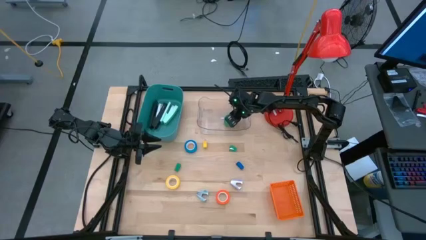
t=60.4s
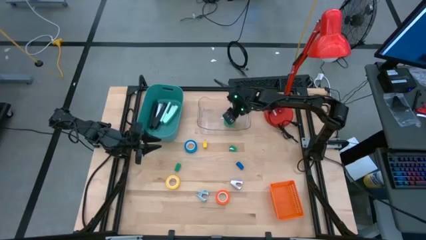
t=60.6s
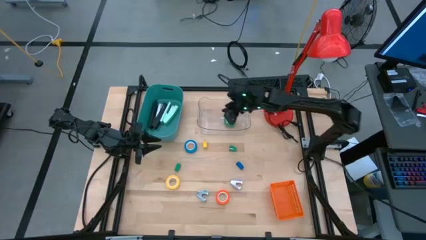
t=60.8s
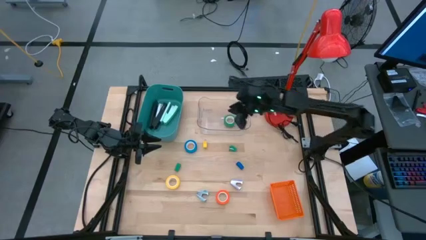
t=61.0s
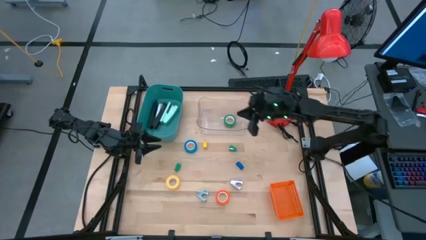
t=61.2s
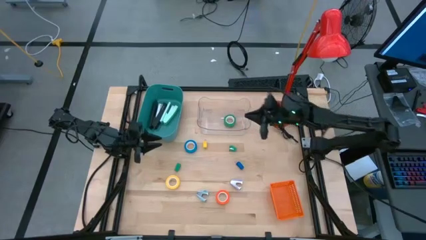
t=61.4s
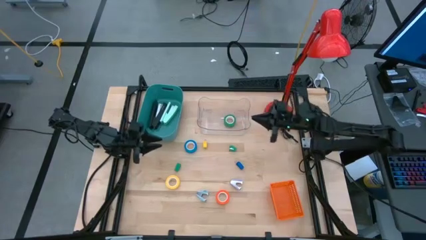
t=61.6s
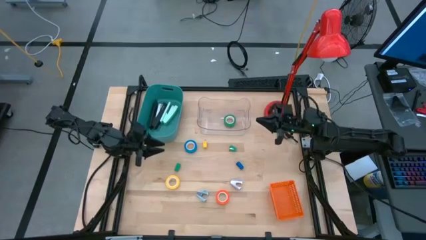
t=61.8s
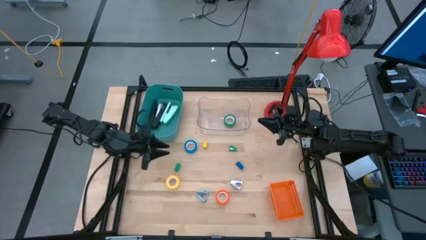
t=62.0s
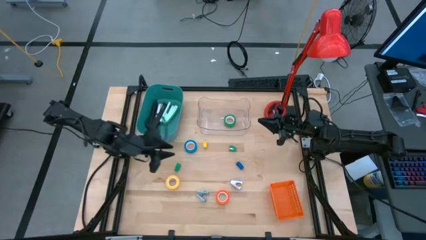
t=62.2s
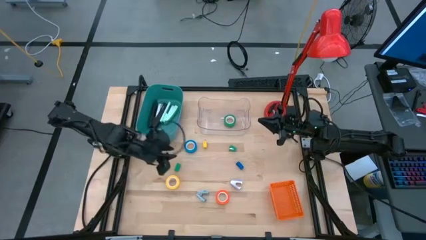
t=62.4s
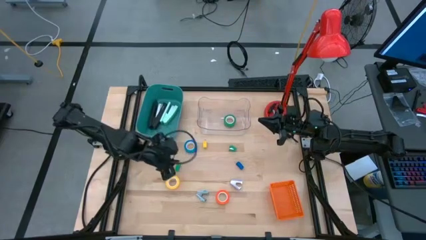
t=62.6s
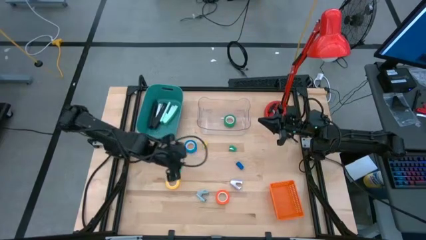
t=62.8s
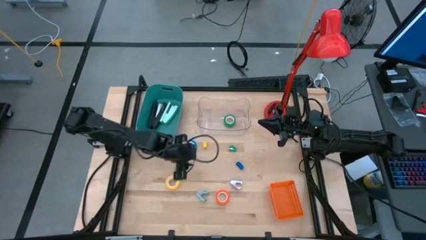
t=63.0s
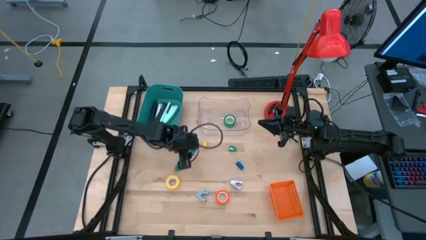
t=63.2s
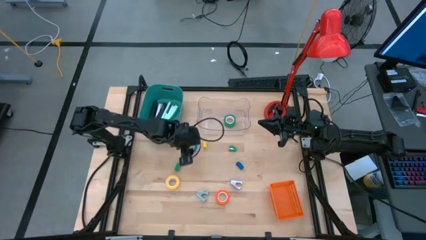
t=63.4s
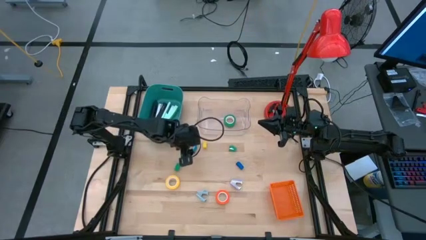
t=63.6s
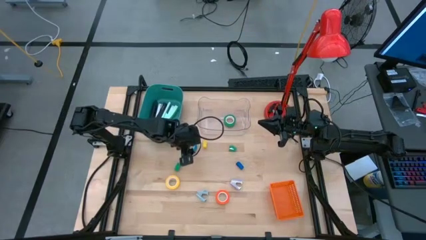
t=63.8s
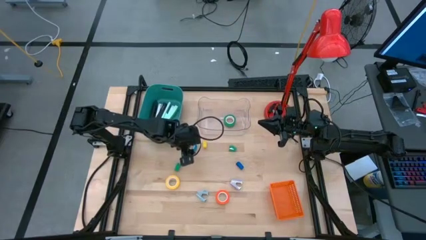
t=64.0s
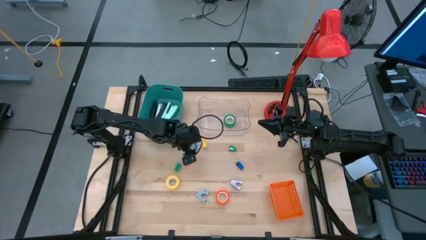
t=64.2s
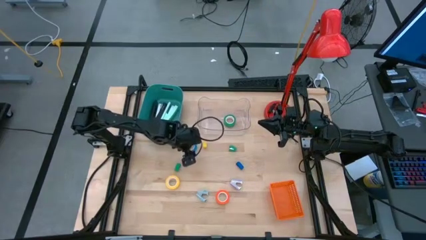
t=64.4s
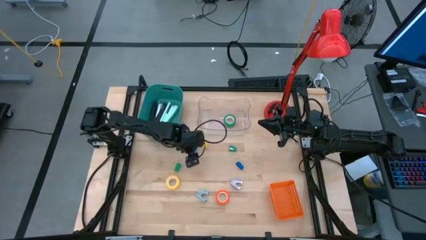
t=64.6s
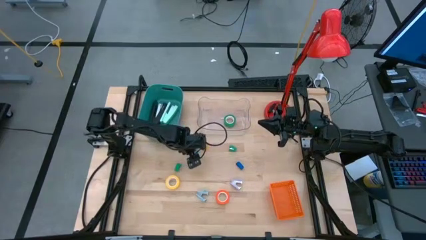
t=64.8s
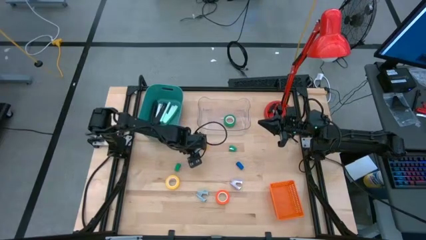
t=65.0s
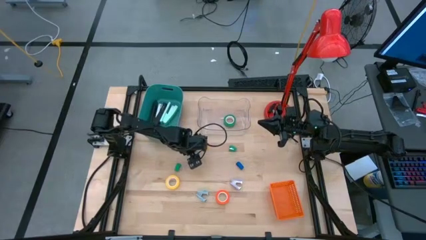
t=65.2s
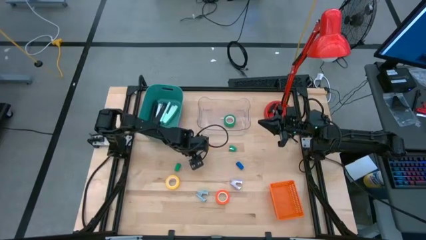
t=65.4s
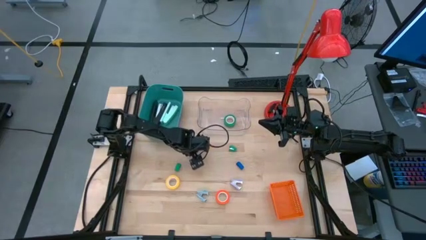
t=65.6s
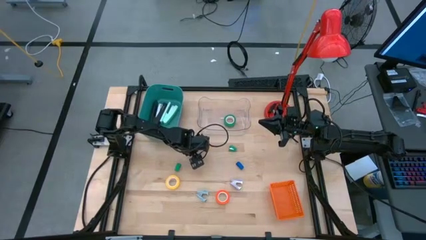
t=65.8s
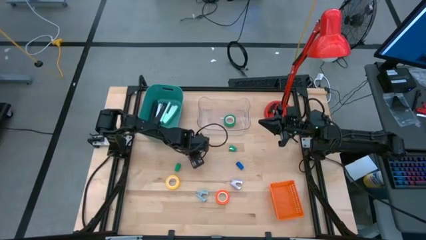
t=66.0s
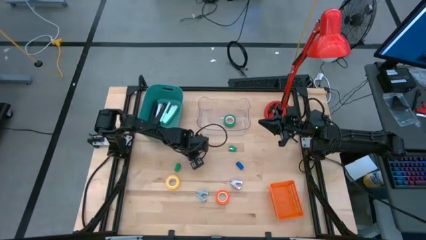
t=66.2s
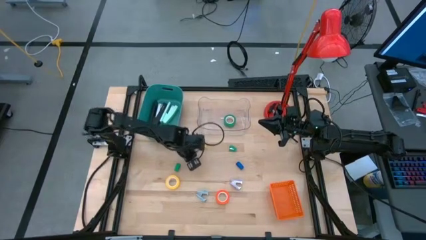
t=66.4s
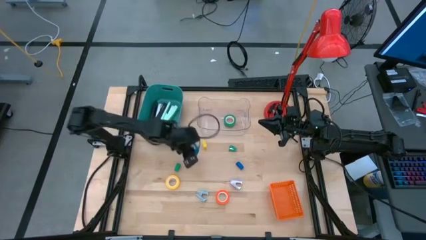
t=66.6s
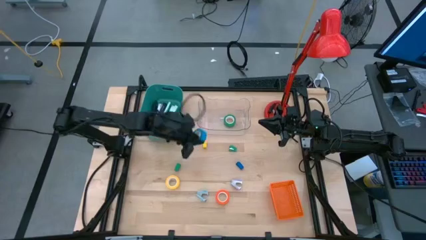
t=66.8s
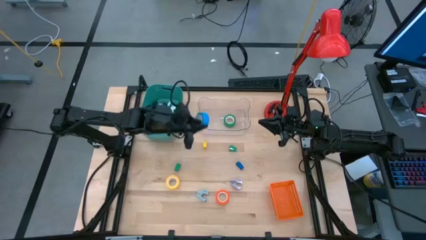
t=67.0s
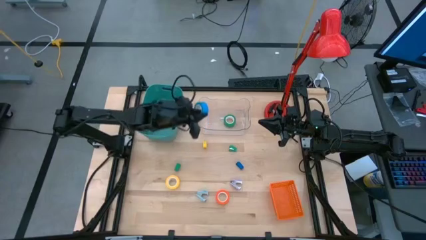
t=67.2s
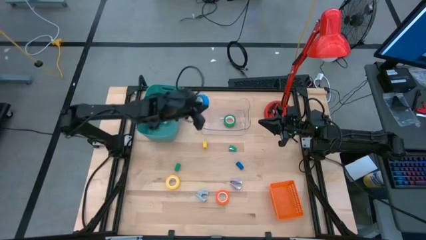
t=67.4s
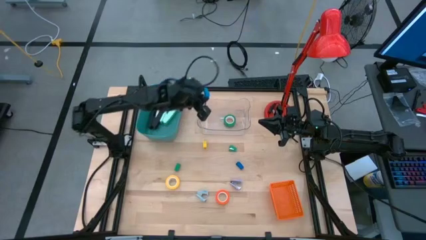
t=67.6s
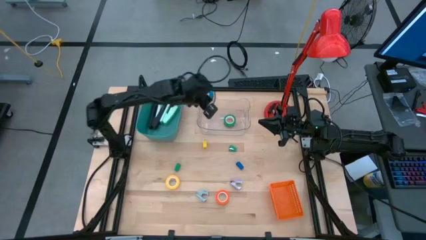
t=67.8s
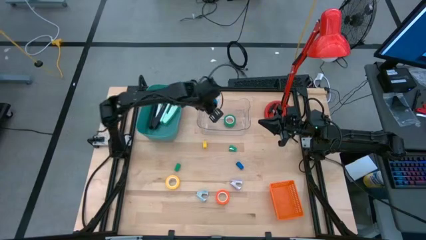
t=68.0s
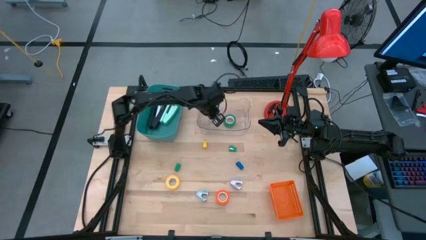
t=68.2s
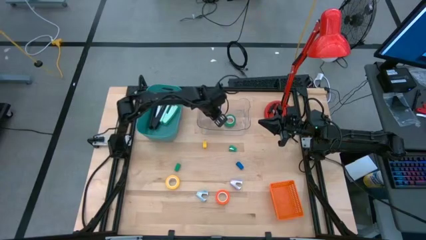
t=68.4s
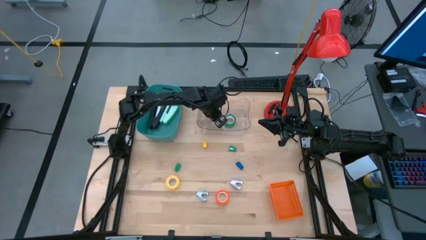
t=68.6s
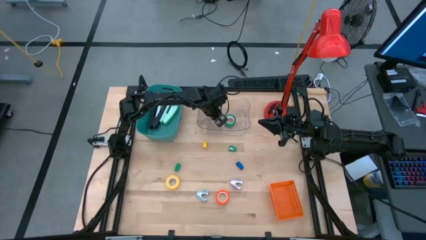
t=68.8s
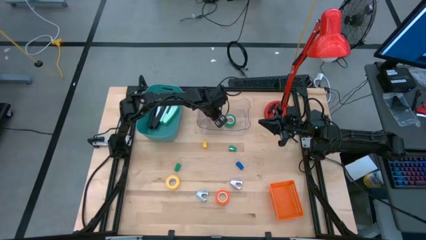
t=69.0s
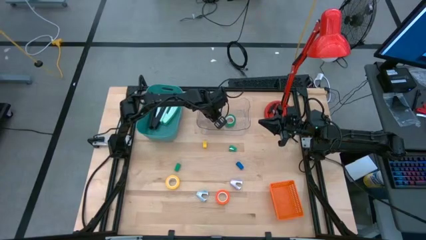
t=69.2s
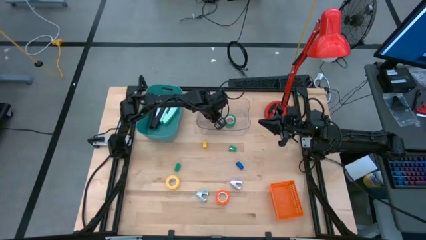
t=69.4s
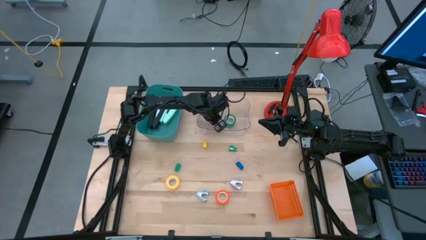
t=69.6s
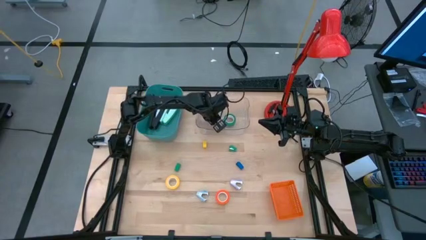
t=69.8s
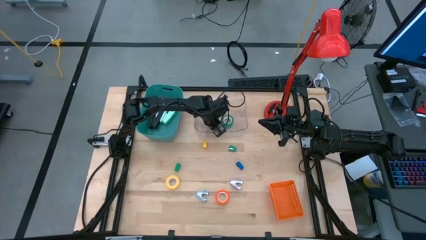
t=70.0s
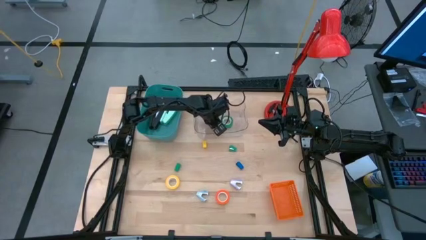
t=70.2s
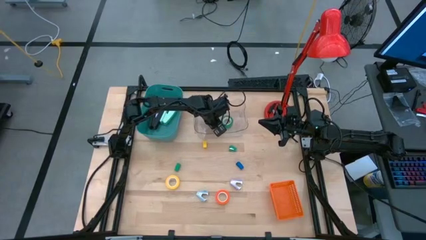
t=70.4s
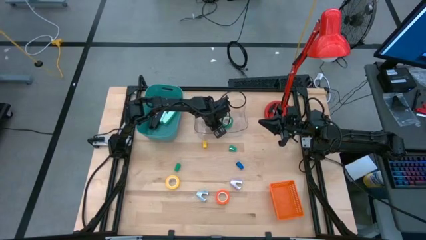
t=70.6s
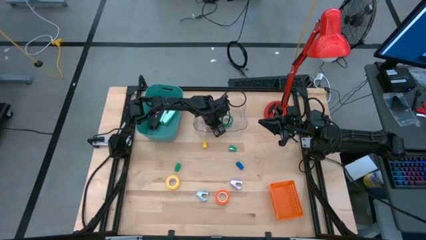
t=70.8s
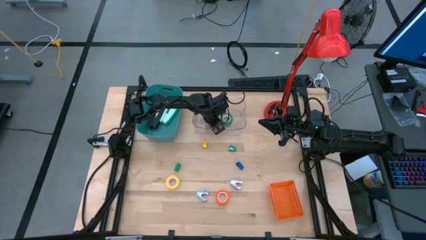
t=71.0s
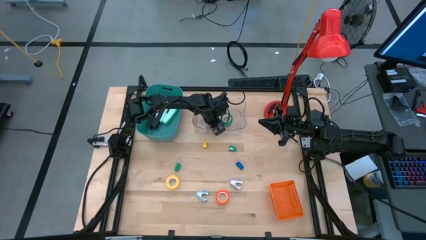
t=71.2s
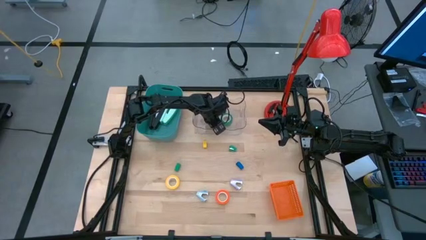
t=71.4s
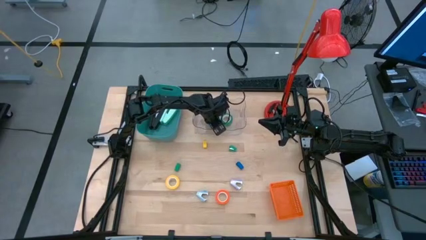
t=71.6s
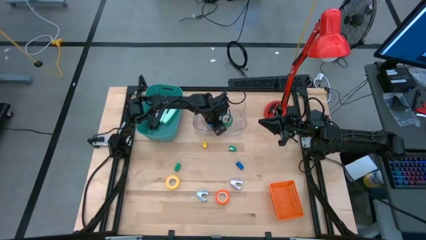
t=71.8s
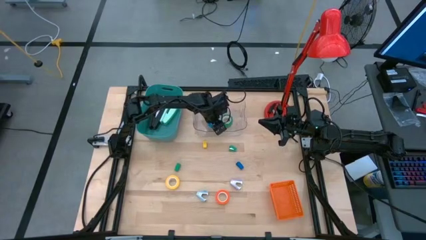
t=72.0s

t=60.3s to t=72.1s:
Task: Pick and place Stapler, Stapler remover, tape
Put the blue tape into the transparent bin

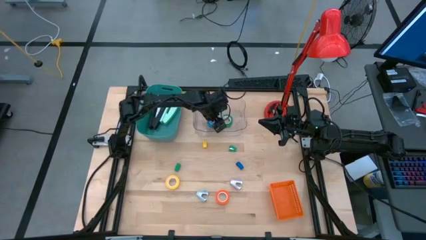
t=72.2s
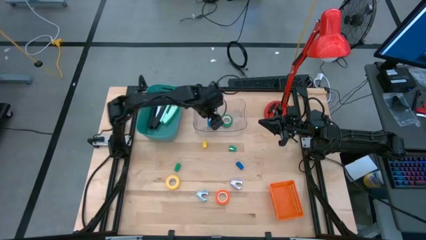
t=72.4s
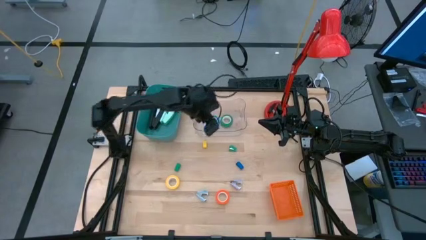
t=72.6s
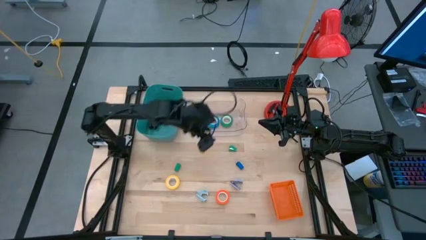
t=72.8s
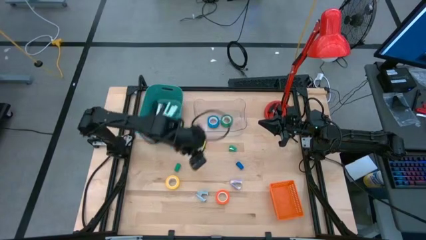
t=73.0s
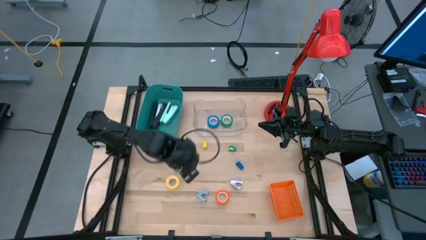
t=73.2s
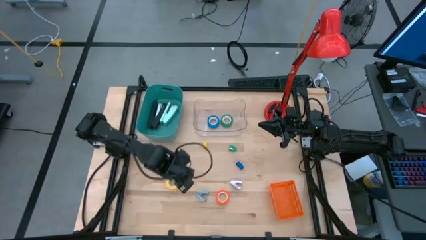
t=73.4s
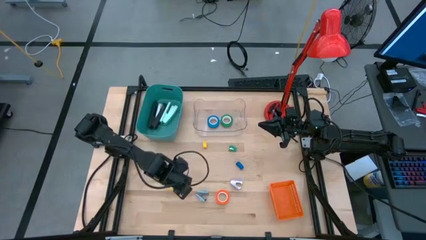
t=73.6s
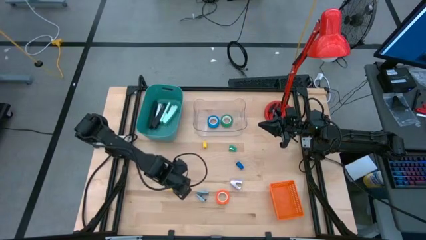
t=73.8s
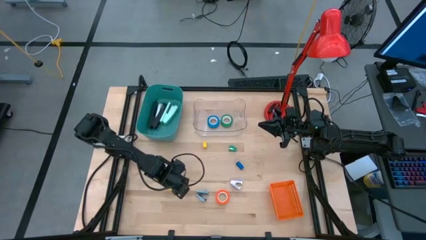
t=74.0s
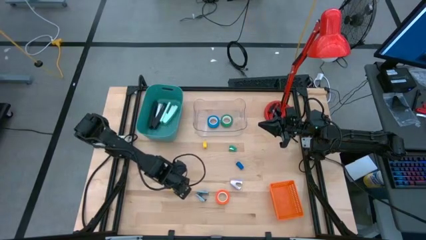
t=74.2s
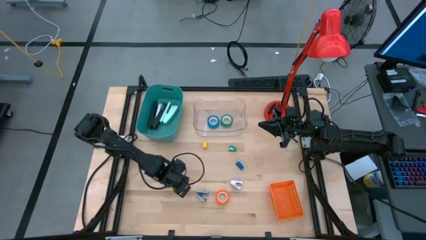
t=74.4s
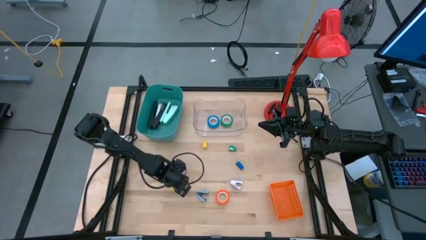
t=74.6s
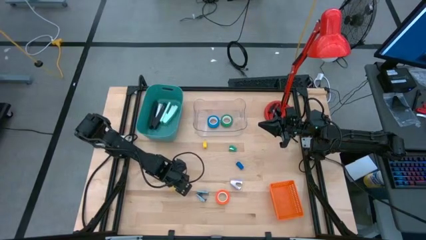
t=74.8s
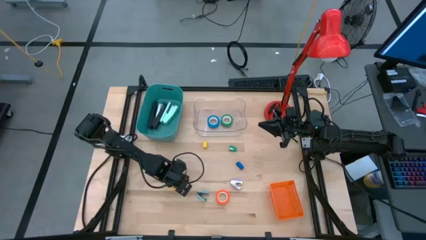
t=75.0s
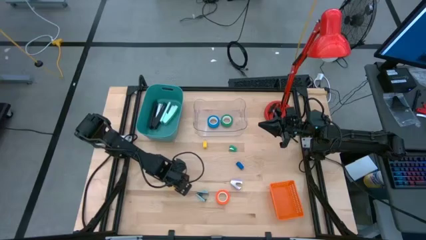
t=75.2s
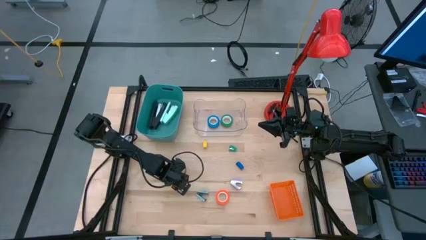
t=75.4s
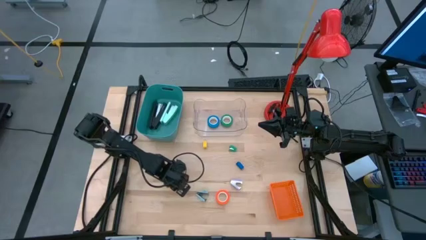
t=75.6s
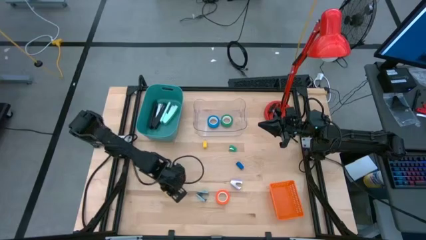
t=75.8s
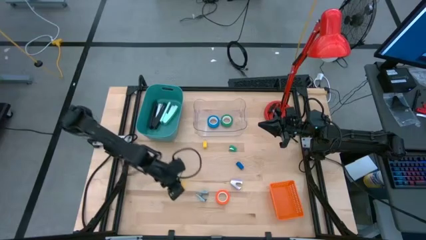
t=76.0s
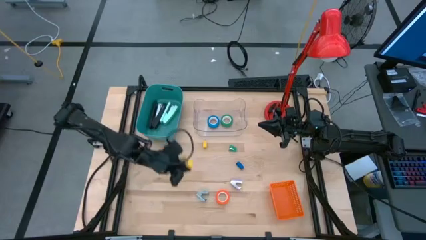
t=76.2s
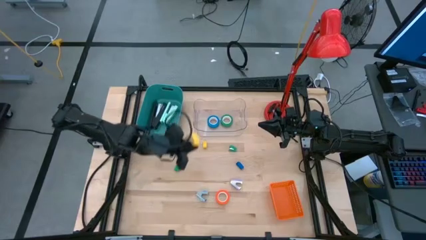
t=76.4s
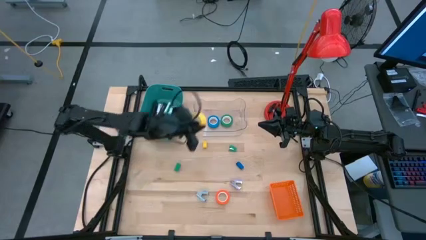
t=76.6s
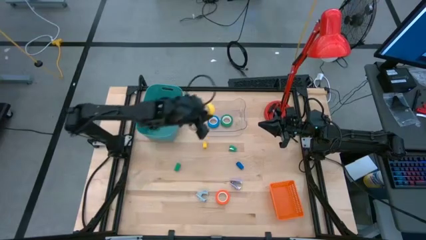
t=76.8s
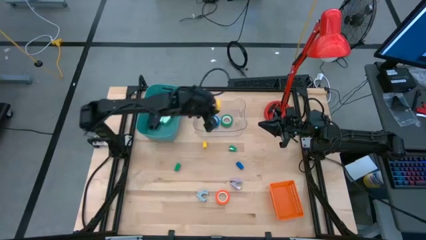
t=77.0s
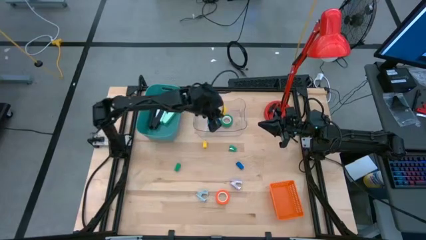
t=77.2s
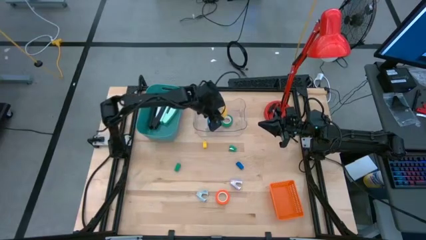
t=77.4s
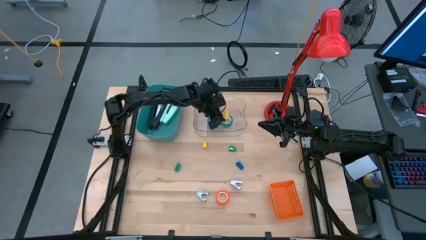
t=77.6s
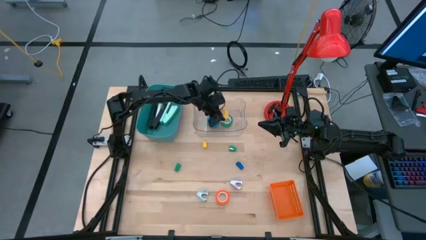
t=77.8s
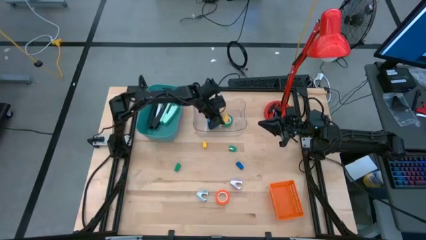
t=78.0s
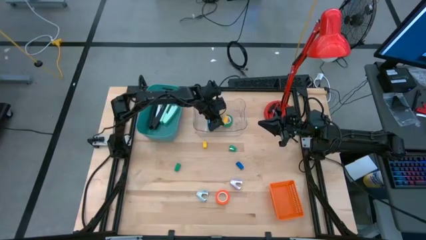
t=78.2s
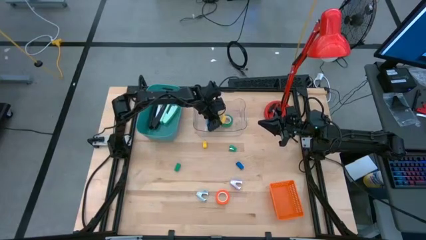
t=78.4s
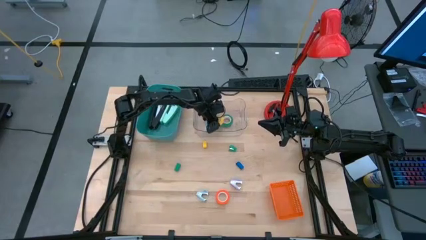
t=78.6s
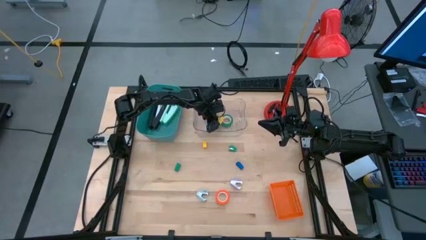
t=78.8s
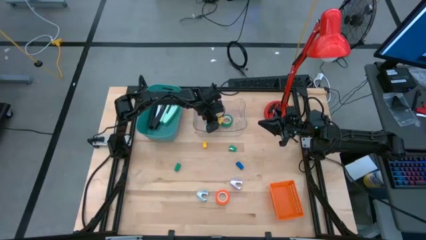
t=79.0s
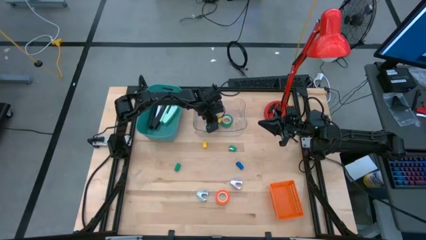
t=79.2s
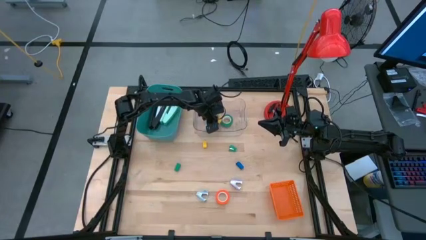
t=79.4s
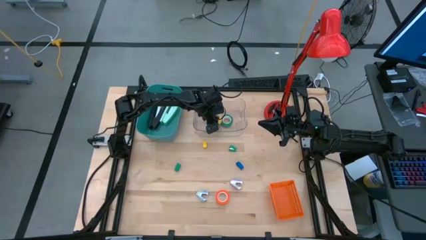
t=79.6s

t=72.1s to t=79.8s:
Put the yellow tape into the transparent bin
